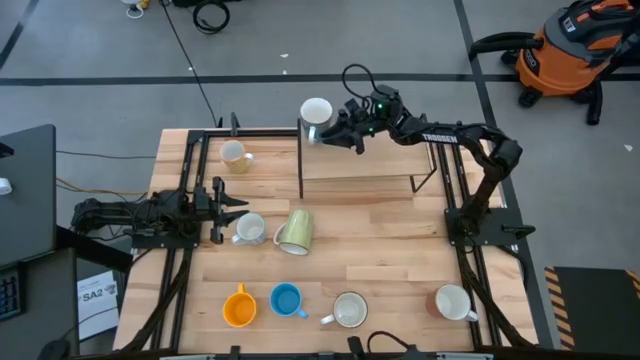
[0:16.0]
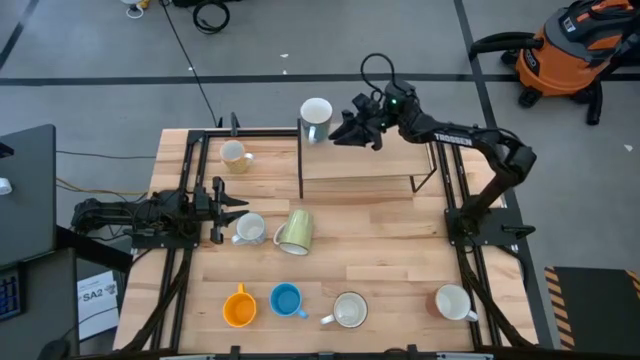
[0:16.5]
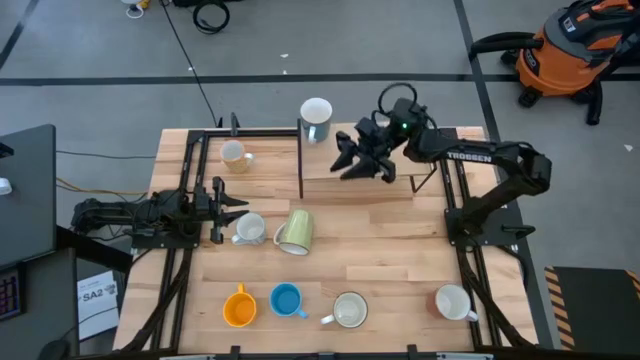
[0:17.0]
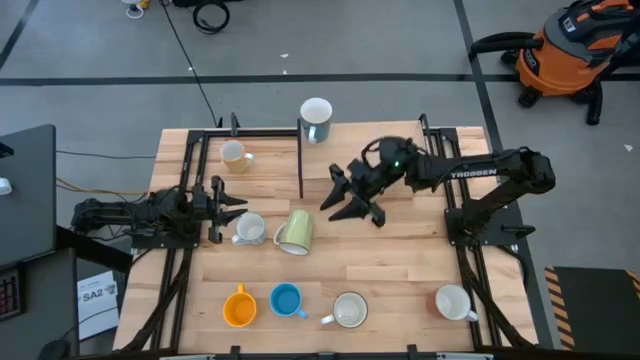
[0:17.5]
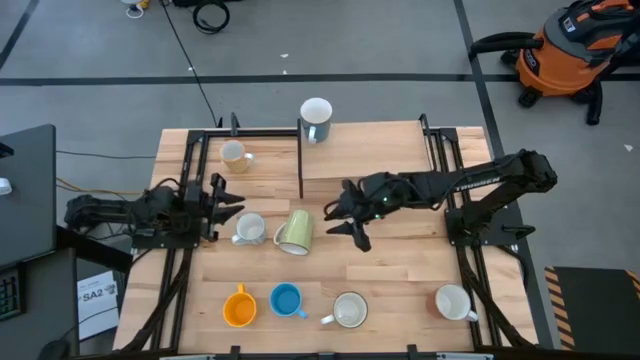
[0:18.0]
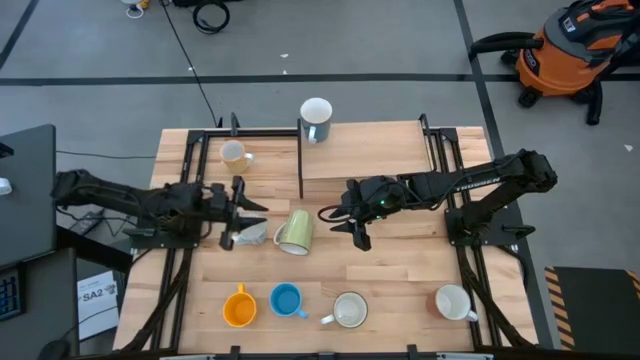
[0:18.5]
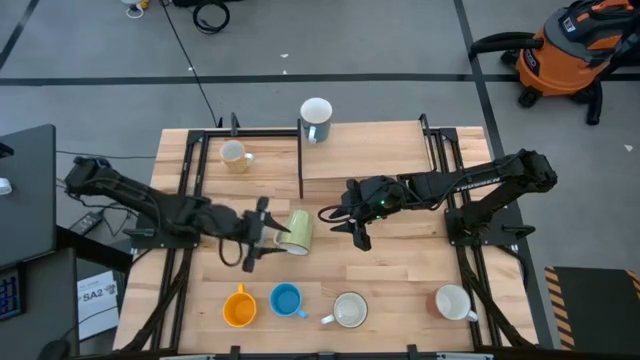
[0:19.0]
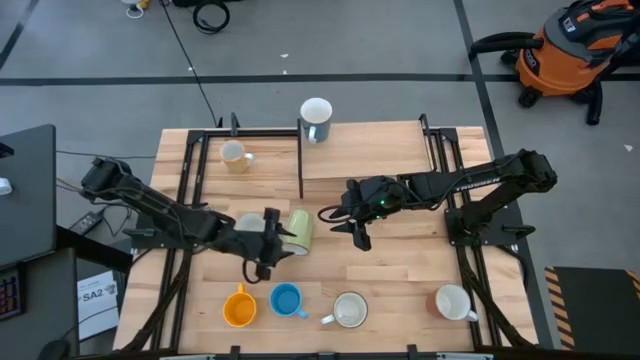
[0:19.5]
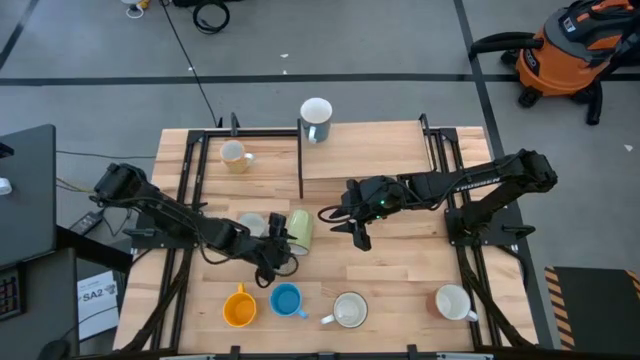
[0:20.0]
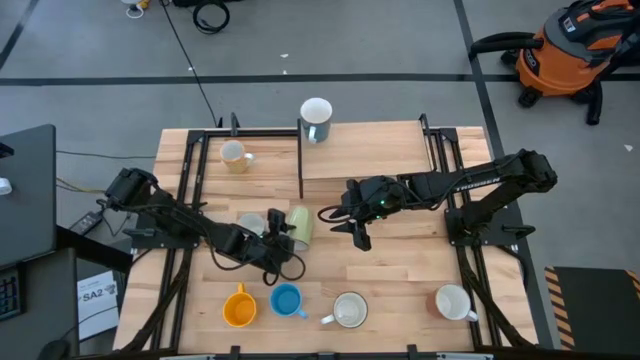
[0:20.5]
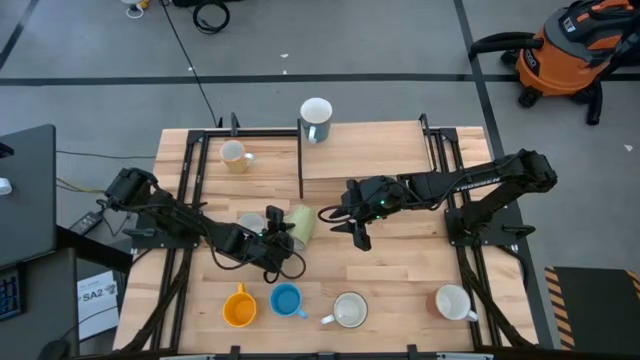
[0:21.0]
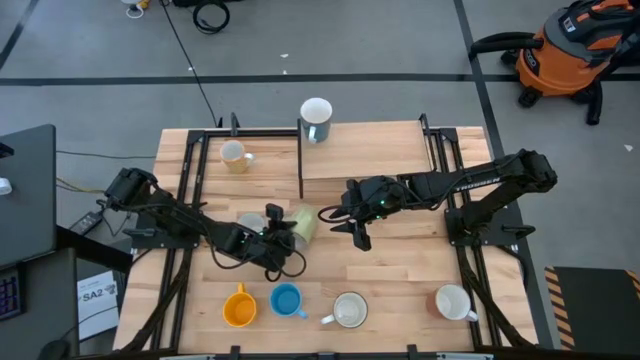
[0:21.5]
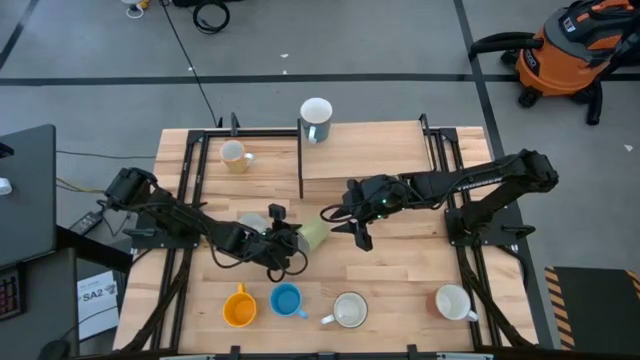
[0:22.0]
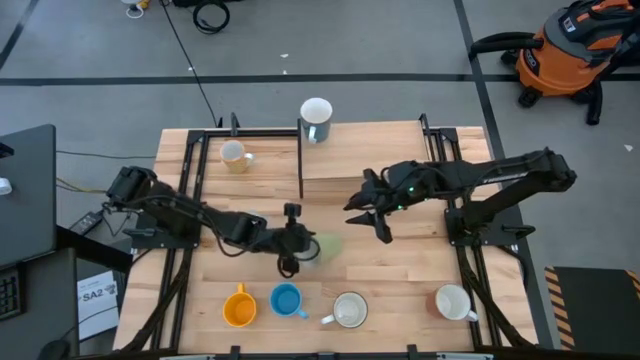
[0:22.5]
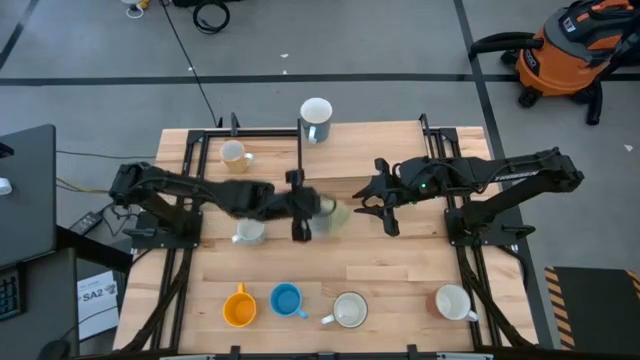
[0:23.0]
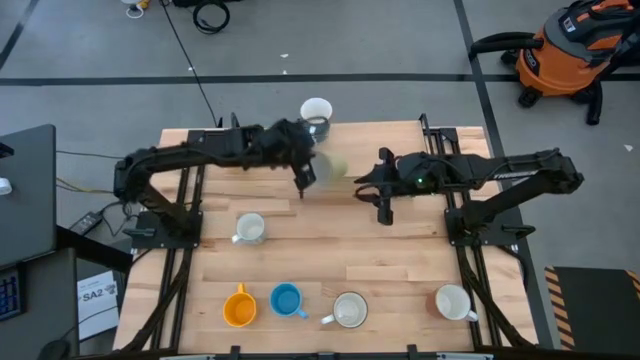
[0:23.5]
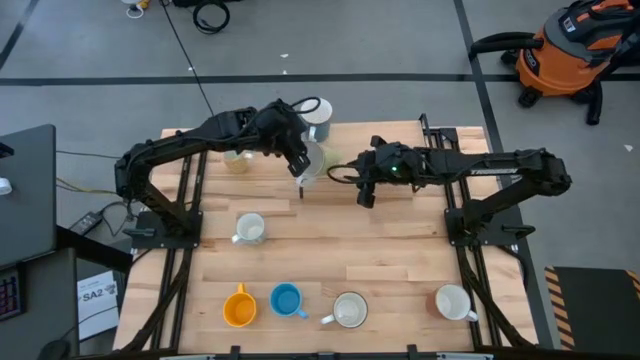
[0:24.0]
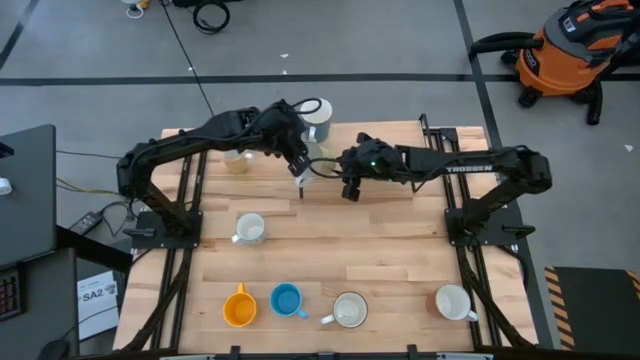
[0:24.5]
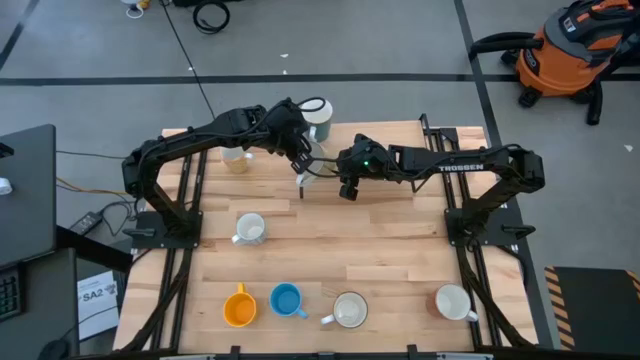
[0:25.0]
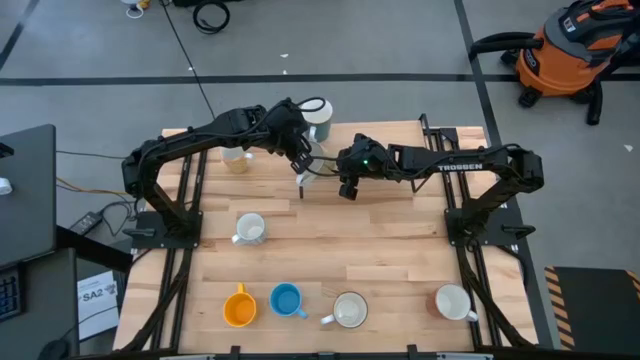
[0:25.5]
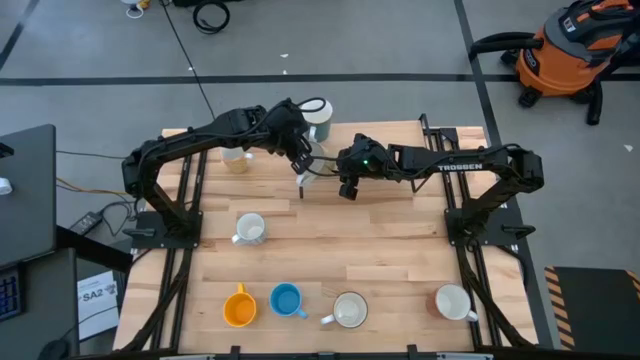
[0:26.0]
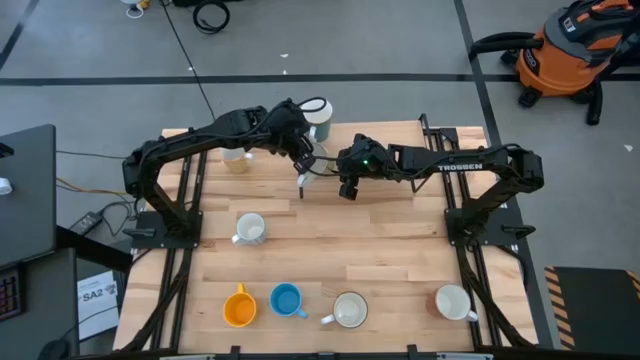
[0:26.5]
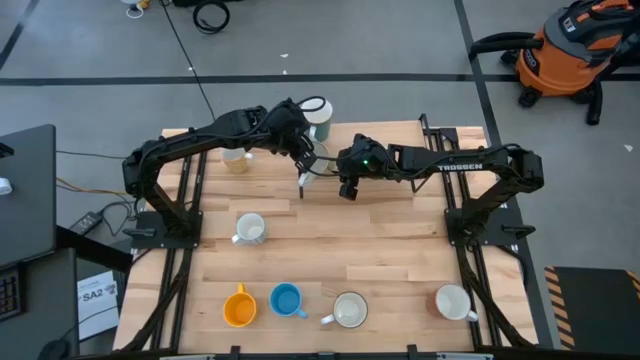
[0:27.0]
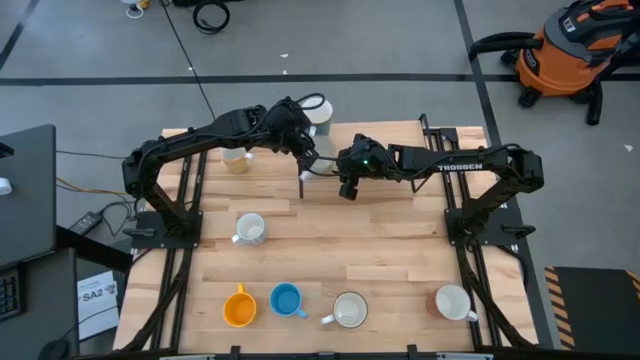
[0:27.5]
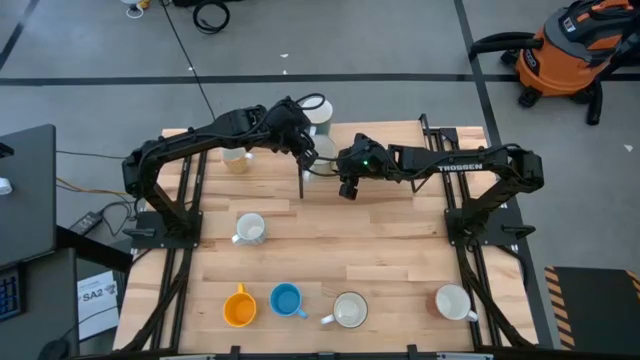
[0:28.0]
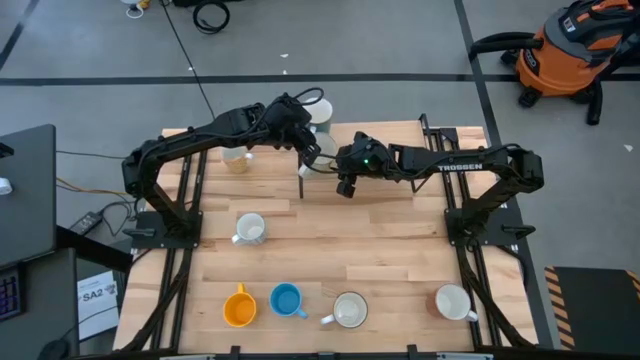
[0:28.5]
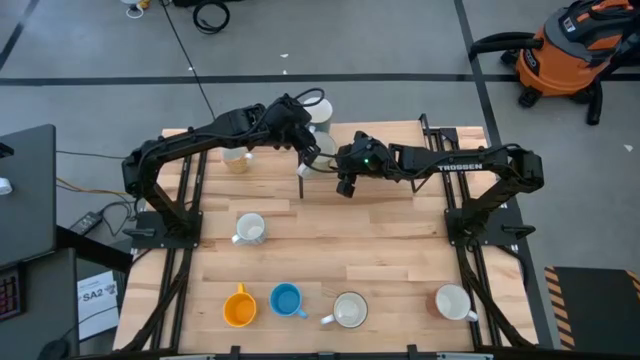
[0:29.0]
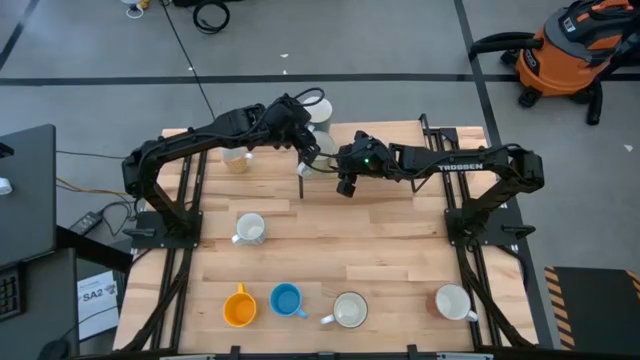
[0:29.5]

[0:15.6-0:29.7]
Task: Place coffee mugs
Put the green mug on the shelf

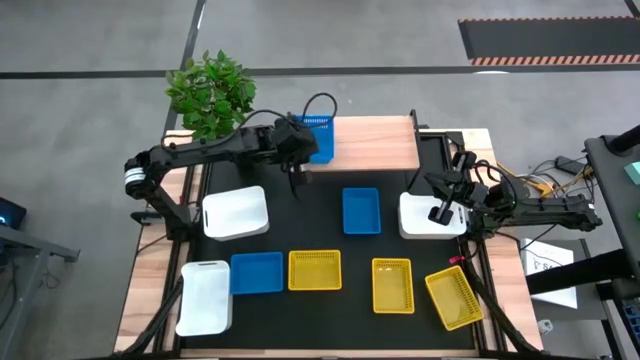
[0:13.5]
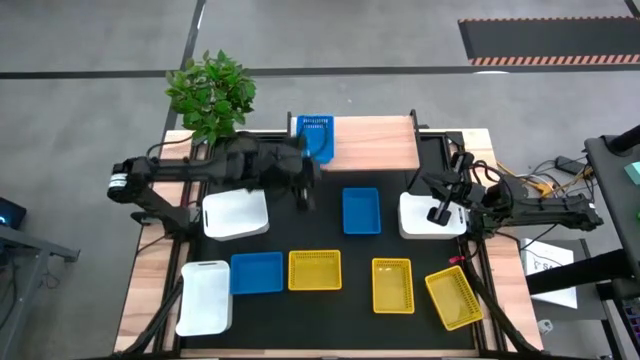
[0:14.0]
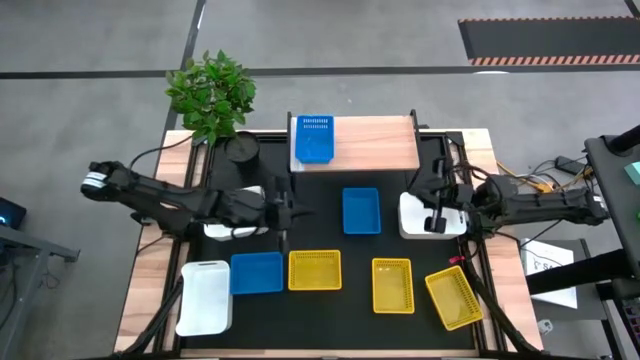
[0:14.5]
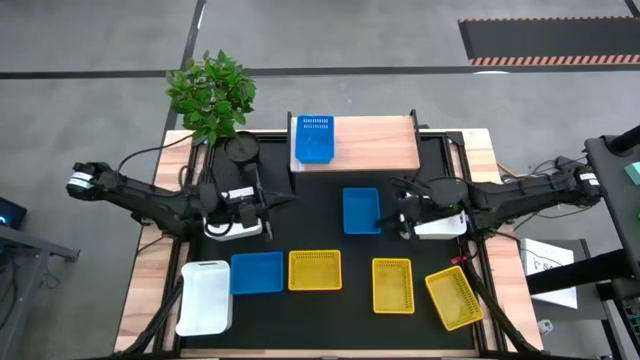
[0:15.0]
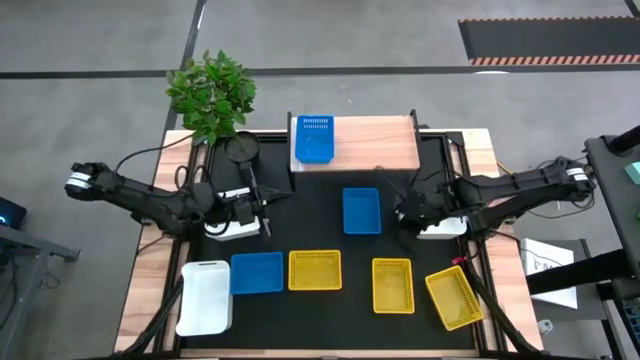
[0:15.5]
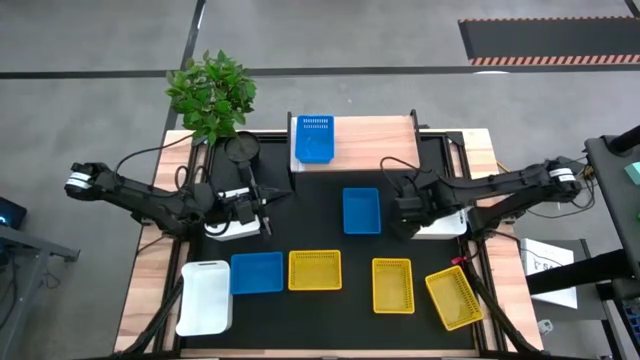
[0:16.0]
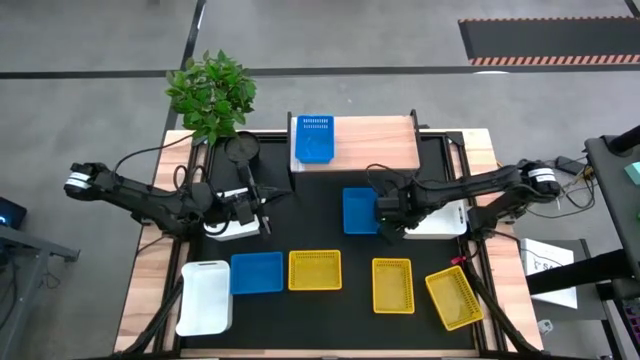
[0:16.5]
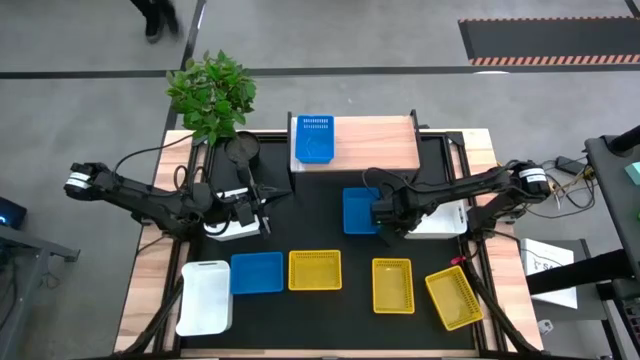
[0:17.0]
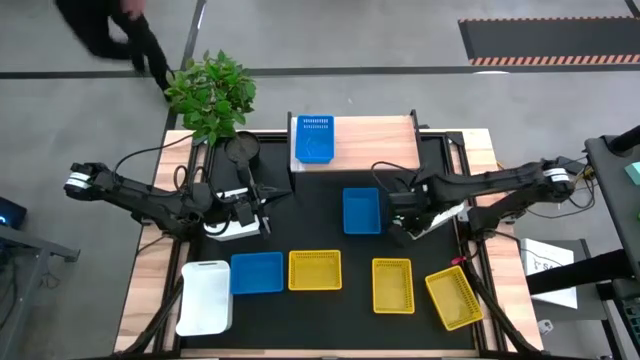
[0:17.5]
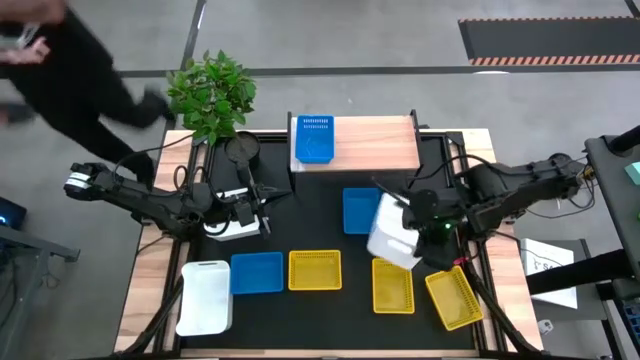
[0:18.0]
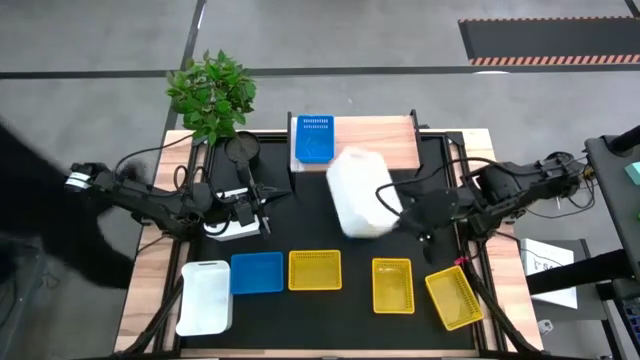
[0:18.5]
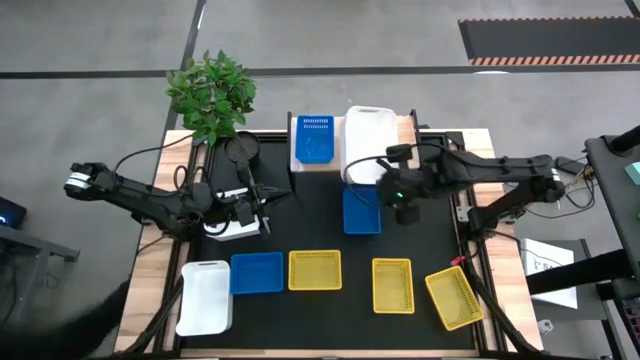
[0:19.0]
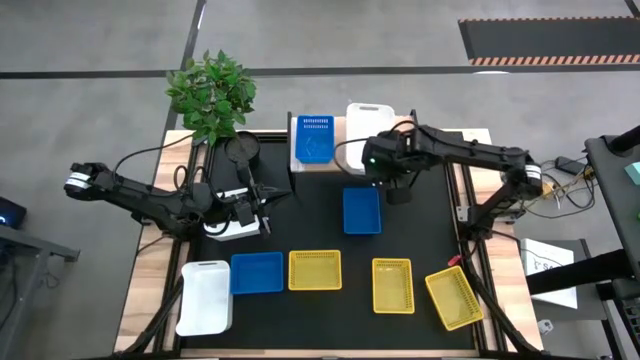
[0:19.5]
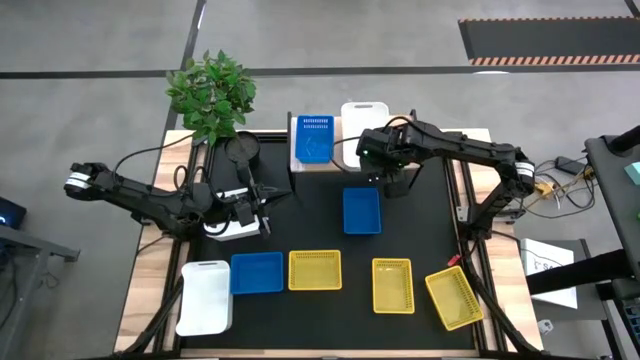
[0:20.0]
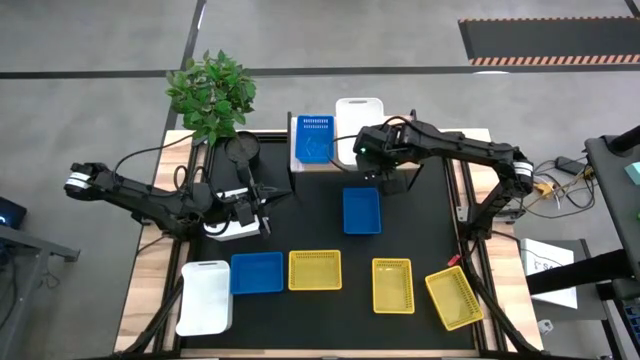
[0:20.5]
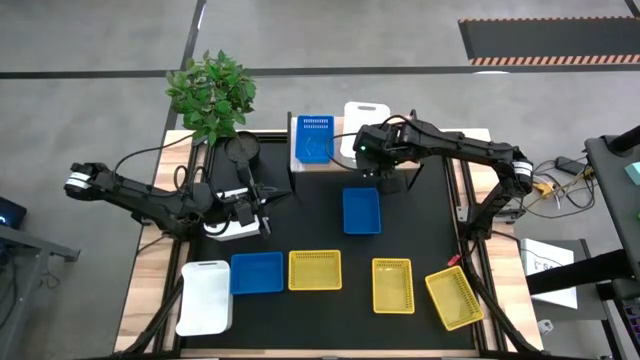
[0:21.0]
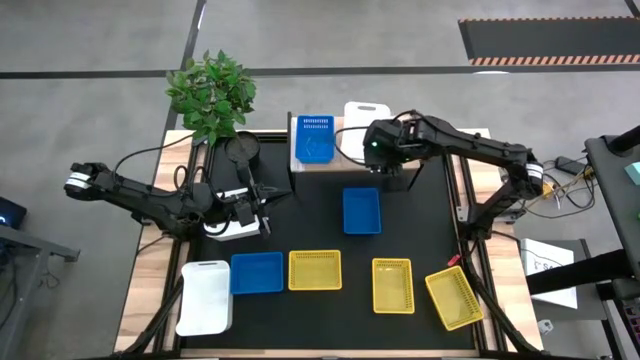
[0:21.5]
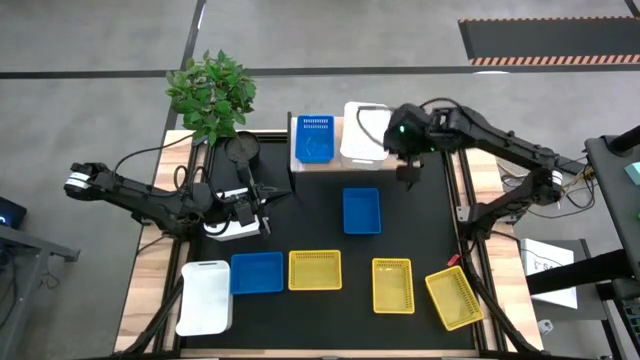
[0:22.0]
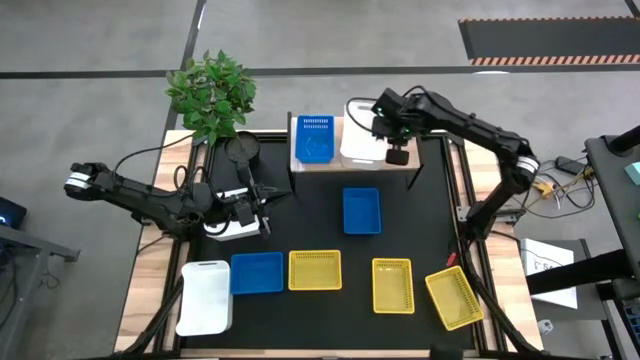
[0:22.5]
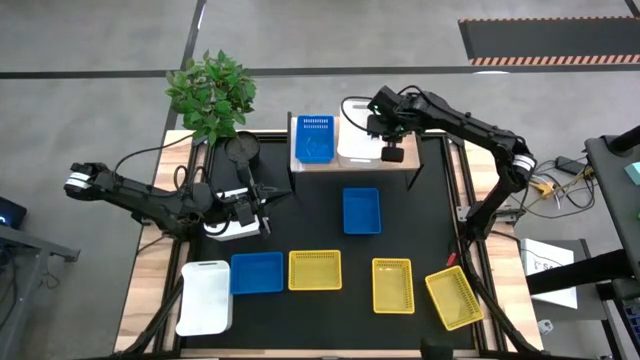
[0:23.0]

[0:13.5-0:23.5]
Task: Stack baskets on shelf by color
Put the right white bin on the shelf
